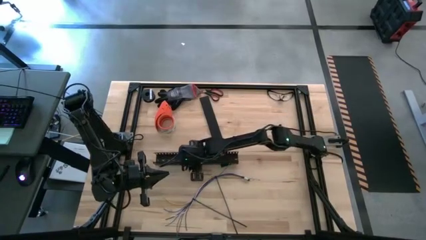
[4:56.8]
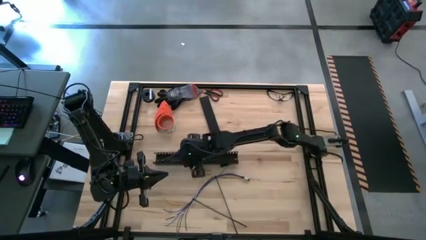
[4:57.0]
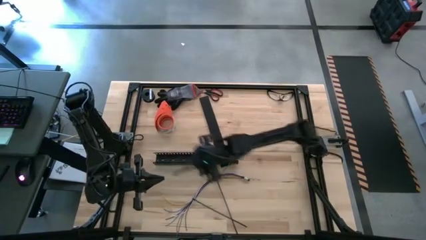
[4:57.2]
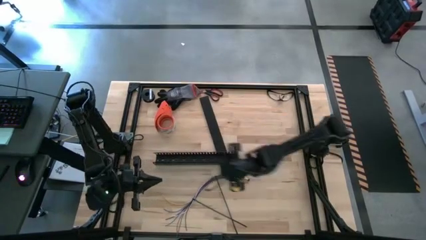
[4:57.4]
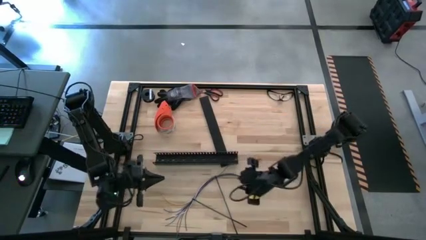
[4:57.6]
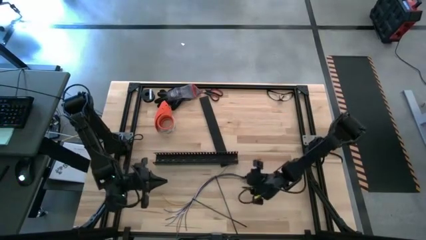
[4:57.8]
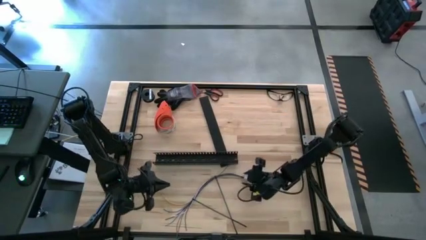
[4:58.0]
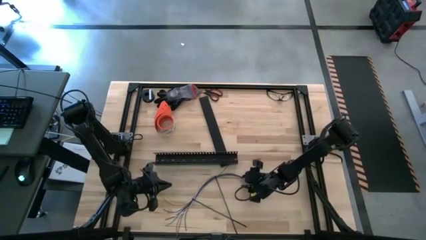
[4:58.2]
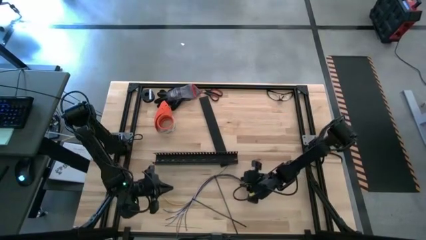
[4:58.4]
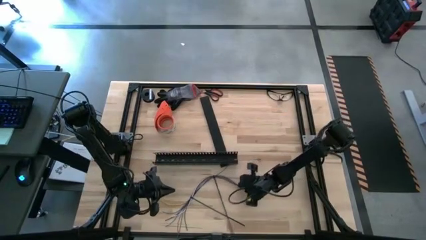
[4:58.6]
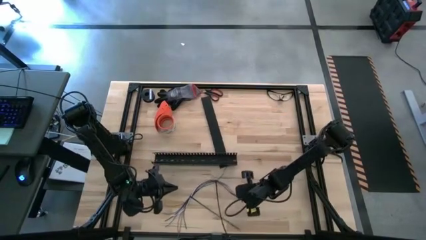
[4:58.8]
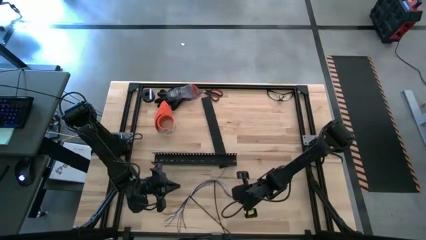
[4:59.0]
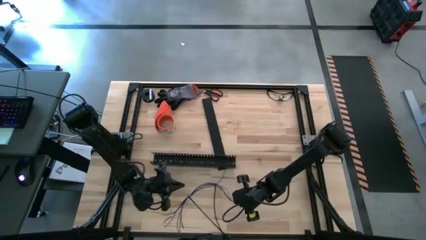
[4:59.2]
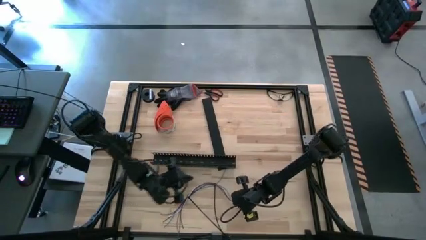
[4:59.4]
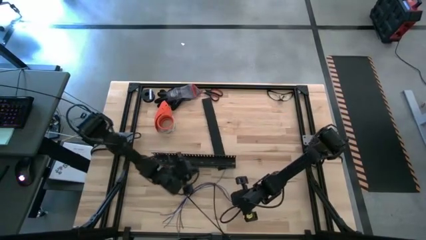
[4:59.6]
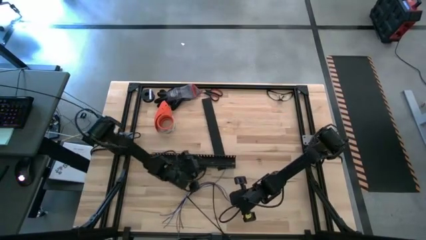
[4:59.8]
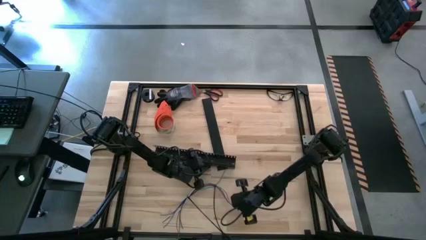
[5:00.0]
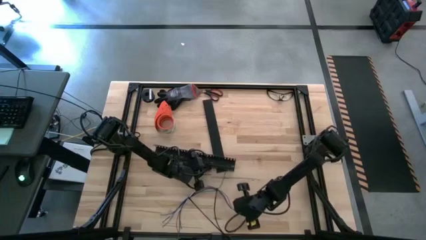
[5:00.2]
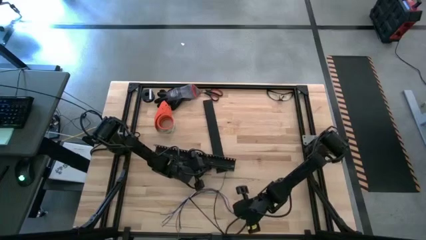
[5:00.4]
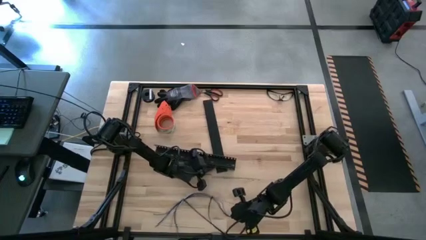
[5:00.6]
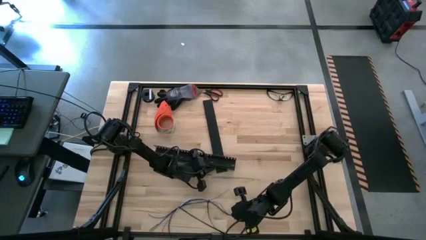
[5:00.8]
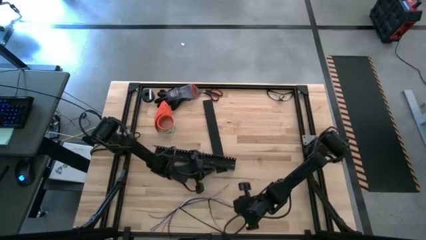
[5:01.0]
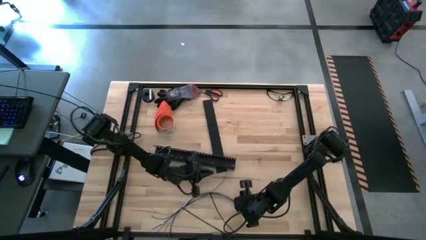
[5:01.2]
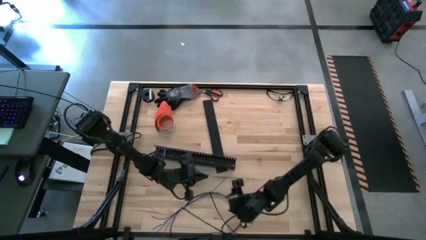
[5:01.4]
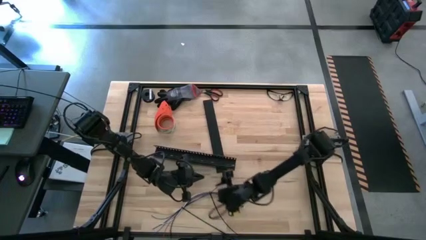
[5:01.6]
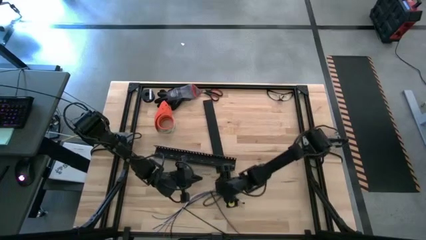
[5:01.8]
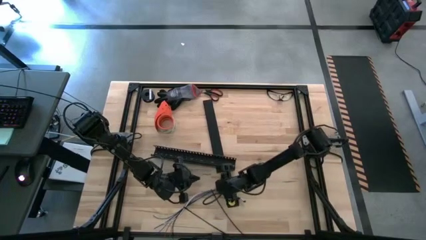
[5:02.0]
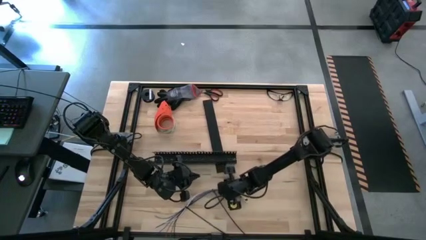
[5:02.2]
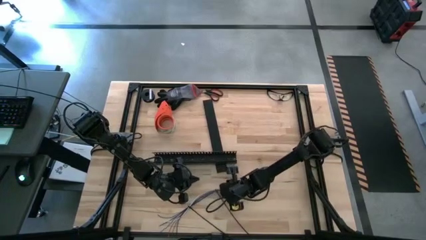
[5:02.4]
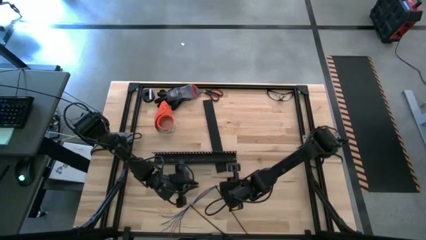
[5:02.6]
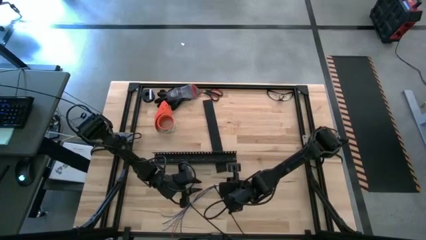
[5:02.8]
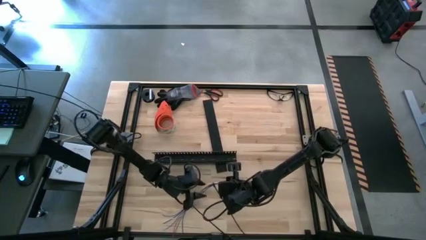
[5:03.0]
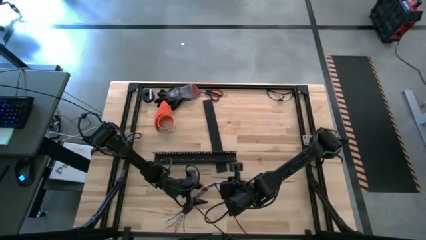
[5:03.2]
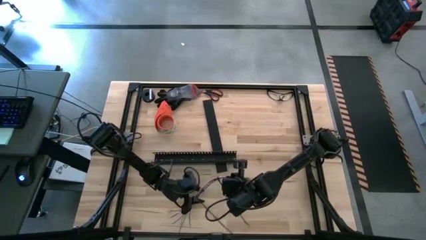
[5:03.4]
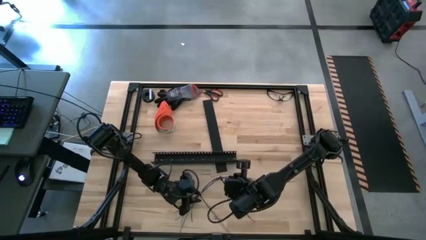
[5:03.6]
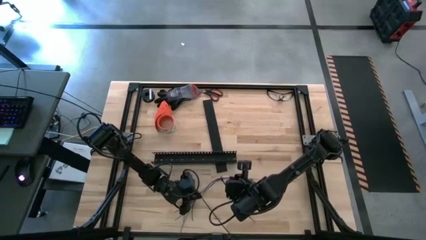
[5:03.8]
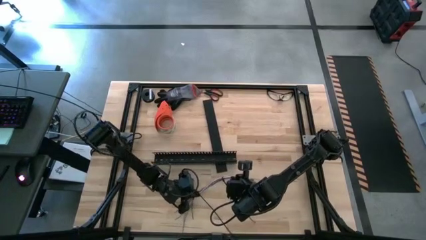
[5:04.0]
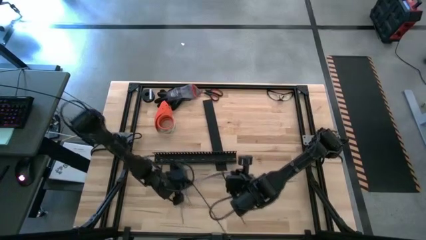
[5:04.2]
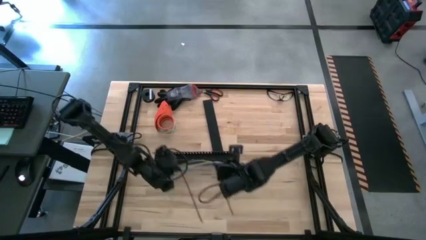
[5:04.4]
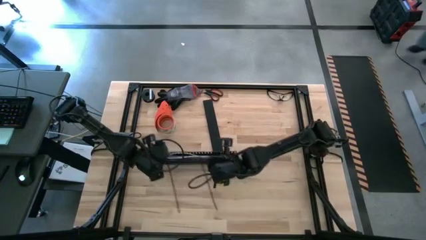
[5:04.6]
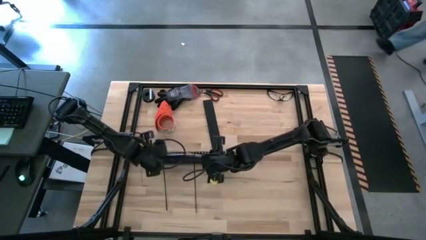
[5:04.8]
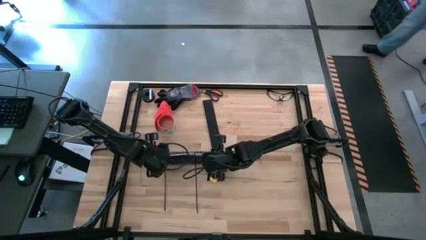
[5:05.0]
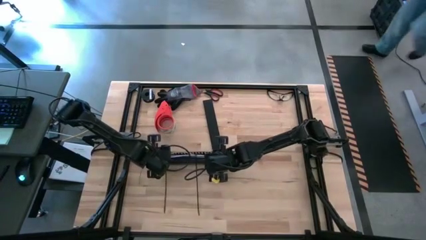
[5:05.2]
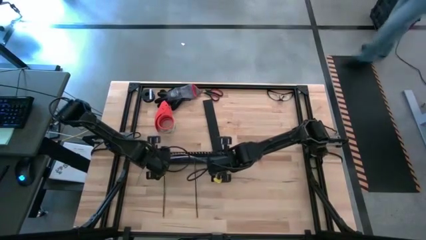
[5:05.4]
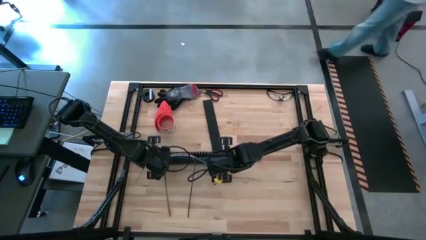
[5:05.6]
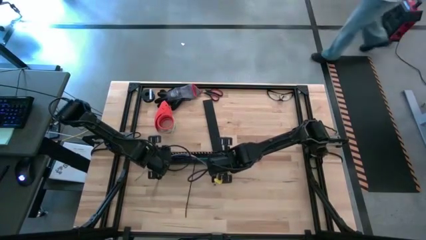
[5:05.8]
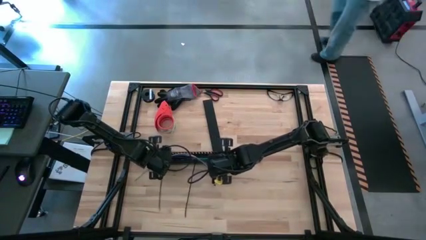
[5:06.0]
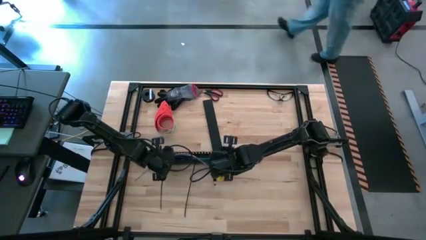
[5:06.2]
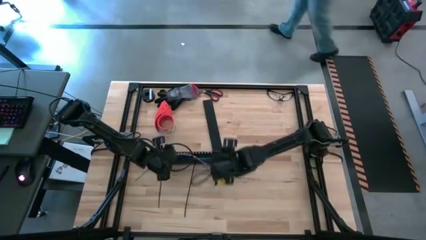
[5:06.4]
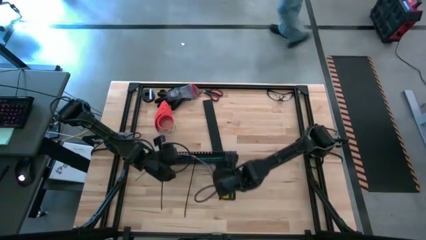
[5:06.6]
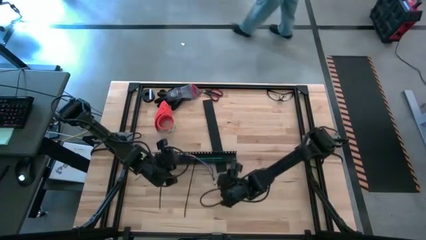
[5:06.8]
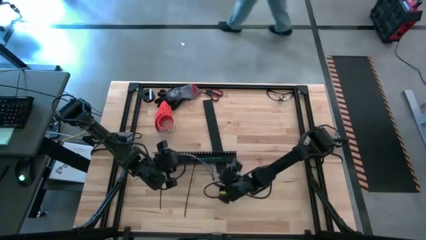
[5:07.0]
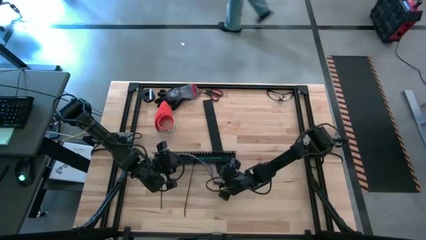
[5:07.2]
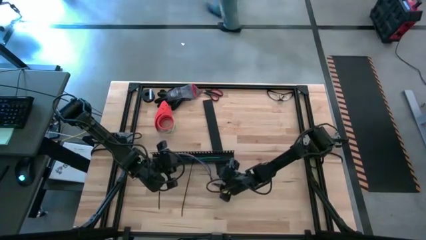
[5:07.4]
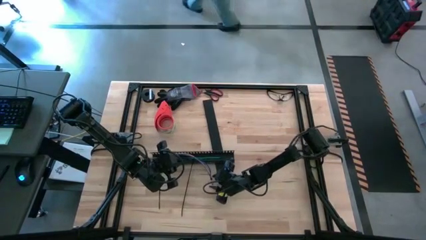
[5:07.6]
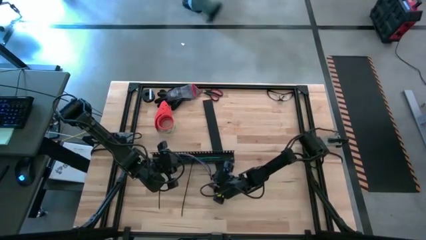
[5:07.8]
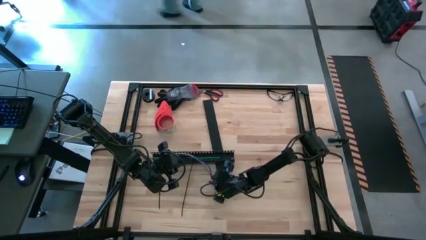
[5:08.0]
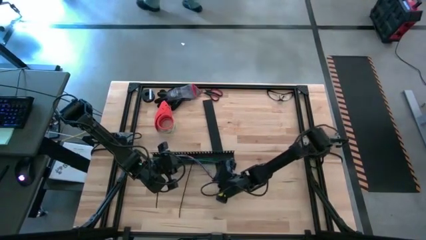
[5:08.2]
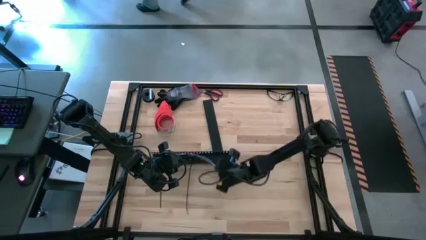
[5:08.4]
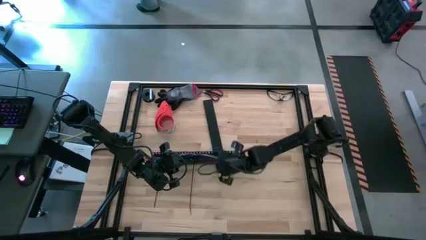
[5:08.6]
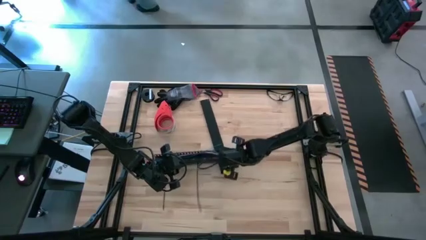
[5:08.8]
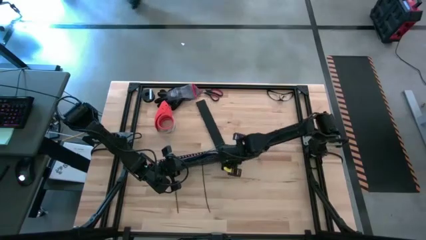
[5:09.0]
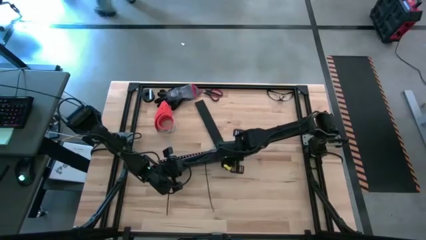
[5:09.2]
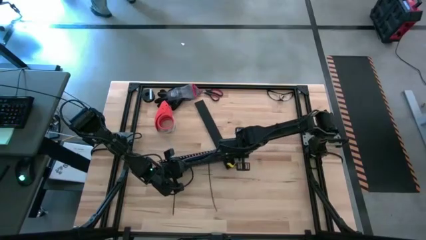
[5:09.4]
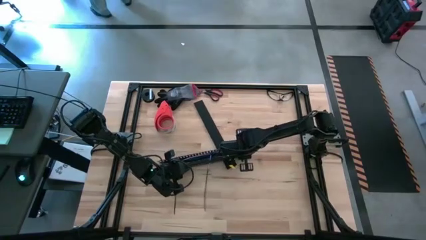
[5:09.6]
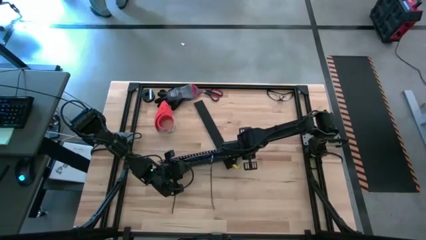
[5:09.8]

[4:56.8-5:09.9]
Task: Ziptie cables
Put the zip-tied cables in the cable duct
